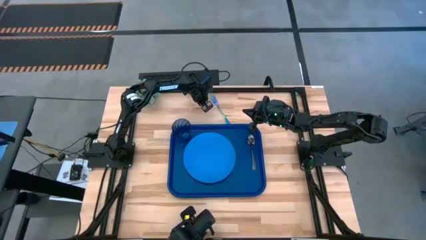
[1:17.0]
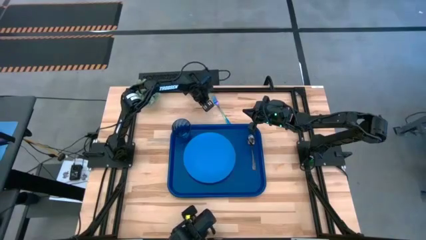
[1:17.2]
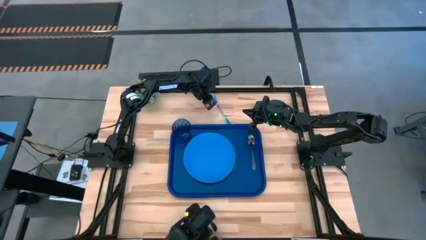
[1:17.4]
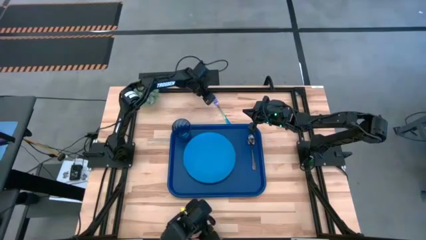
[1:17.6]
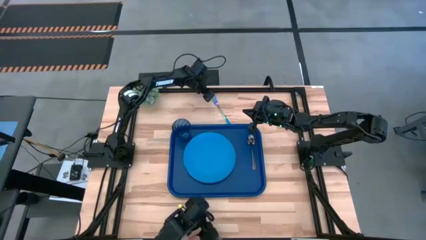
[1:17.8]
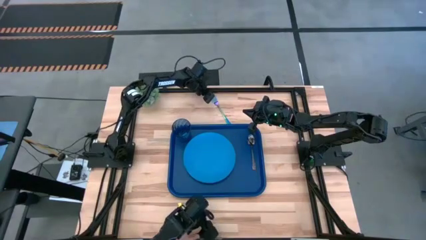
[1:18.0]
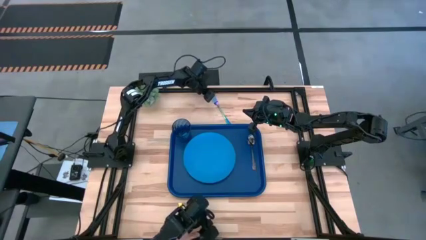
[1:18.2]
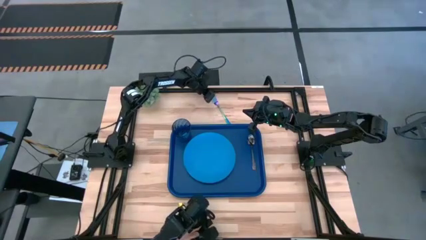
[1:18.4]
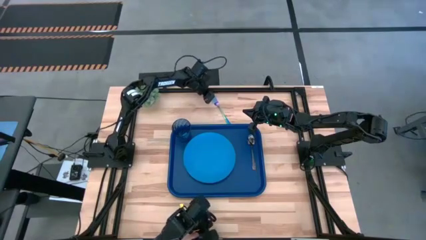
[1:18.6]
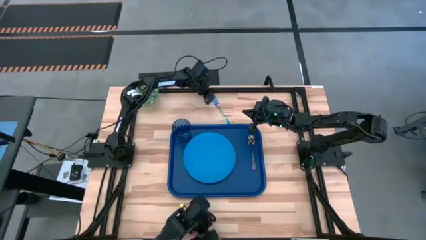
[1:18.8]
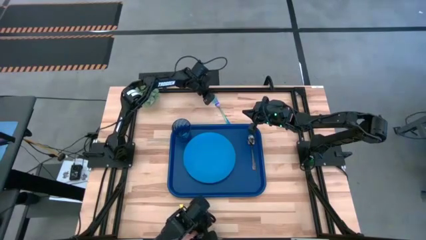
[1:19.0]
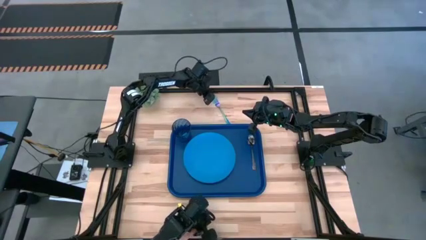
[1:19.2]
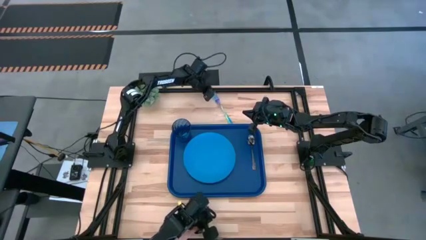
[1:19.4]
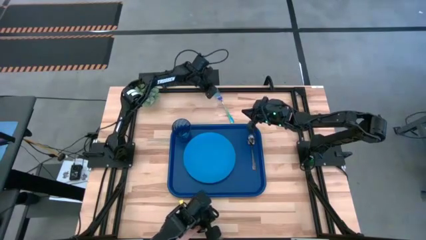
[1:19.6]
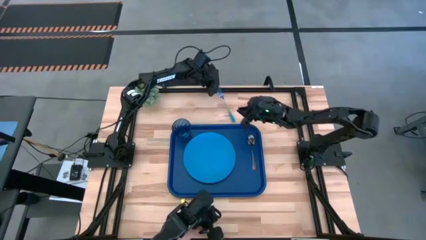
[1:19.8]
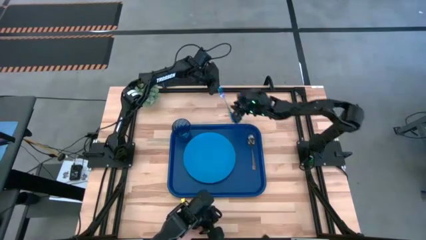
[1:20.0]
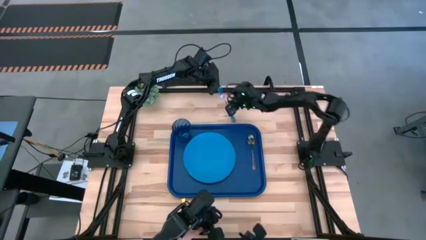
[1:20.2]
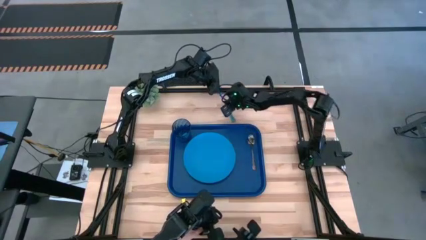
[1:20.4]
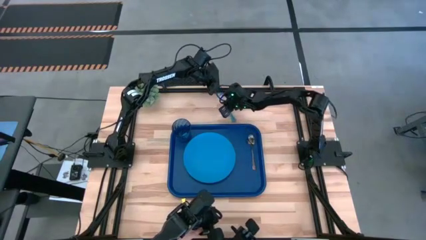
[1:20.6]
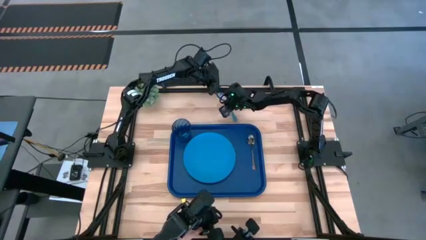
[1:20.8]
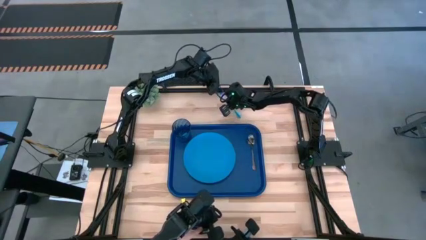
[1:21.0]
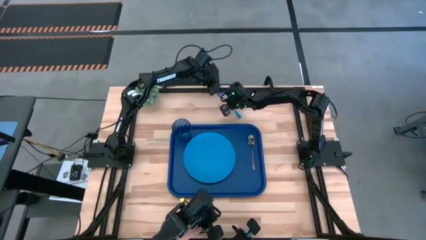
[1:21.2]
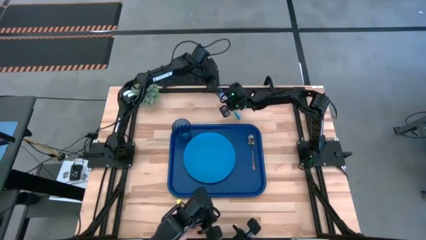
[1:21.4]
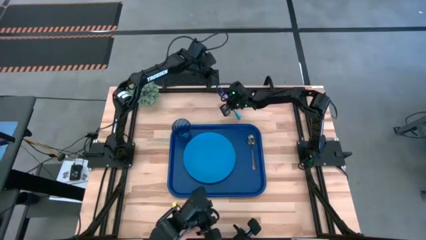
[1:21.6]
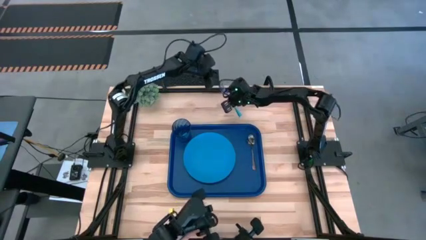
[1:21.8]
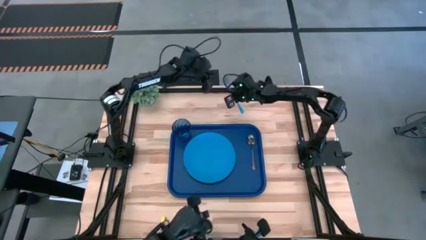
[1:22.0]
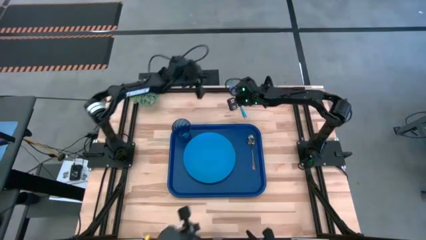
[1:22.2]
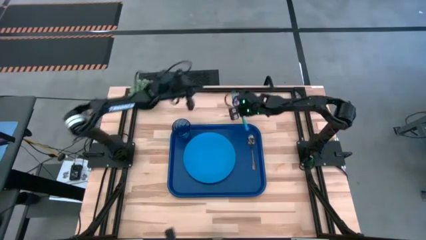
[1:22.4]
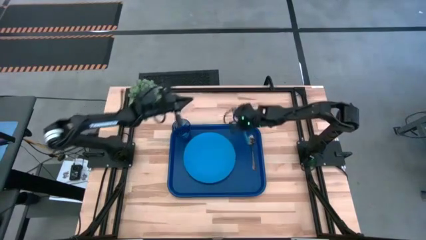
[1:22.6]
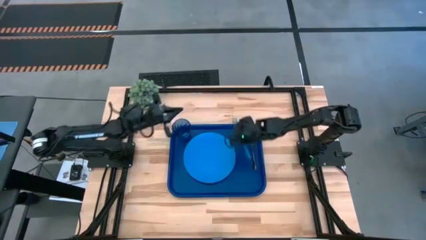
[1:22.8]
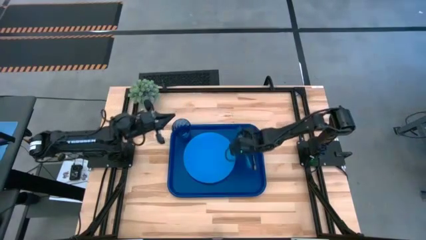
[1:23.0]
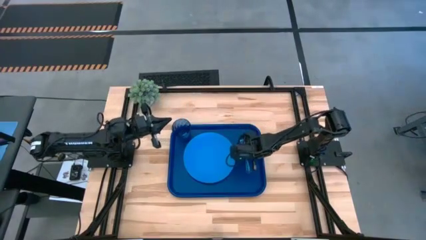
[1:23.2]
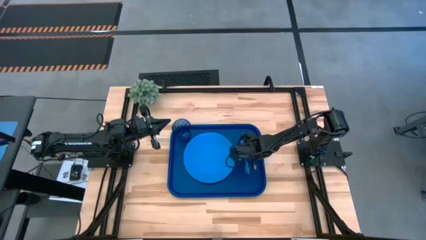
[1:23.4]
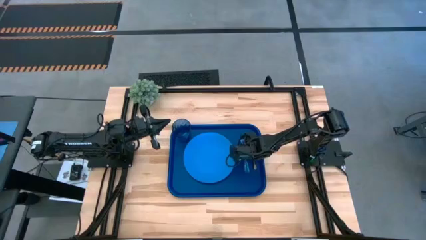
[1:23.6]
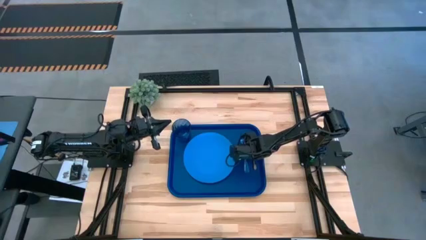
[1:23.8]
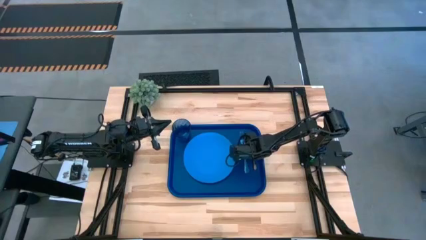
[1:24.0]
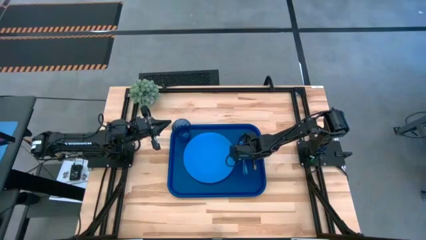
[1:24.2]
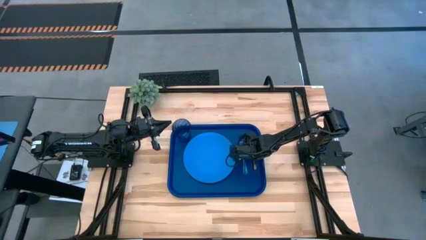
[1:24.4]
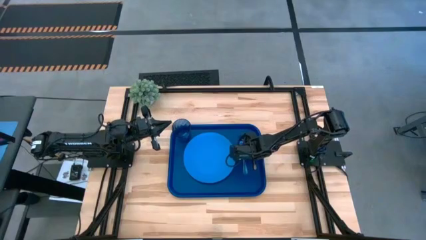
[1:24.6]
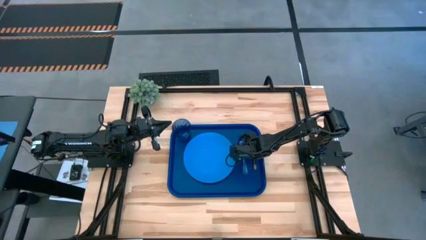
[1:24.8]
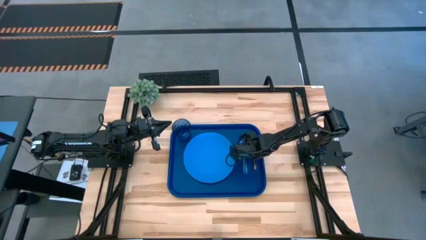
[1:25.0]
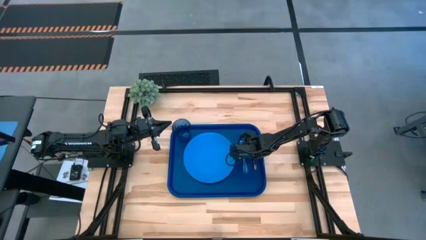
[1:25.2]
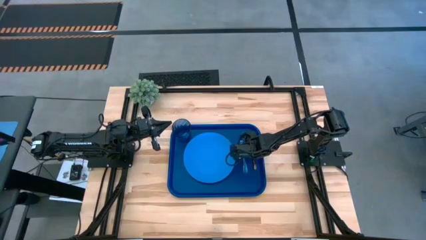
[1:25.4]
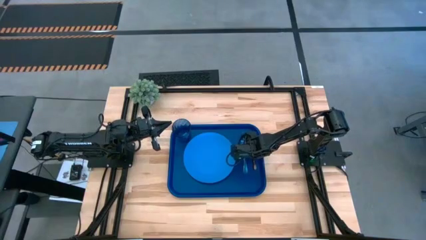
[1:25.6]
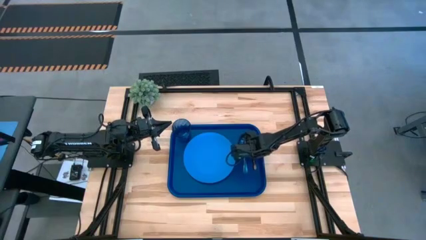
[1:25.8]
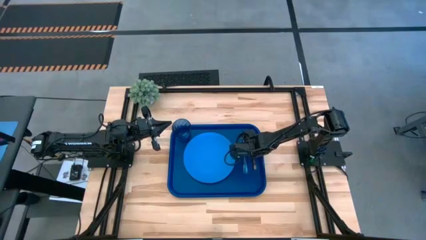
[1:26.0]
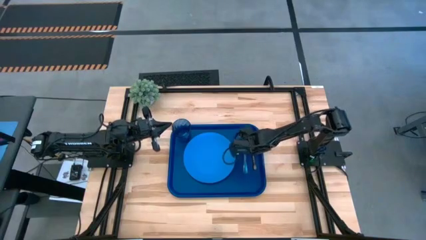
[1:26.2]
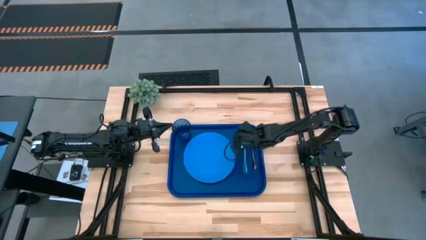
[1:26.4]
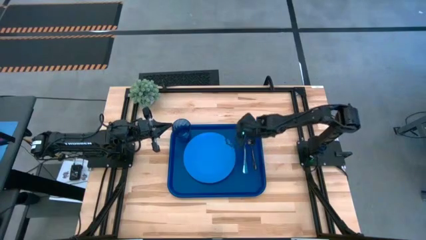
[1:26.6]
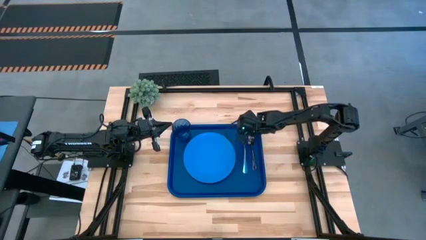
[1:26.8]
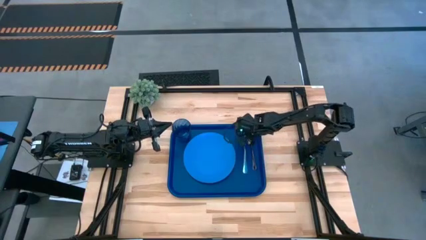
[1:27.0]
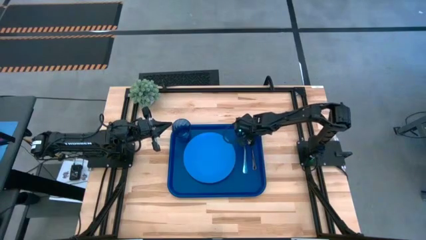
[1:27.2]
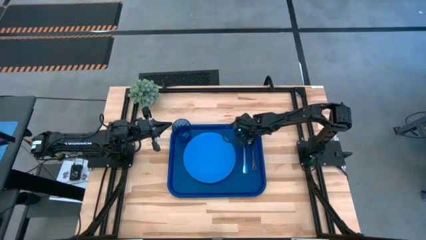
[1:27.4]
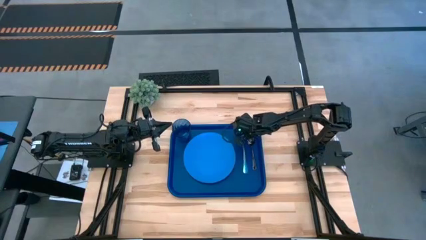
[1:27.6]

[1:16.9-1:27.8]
Task: Pick and place plate/cup/fork/spoon on tray
Put the blue fork on the blue tray to the right of the blue plate

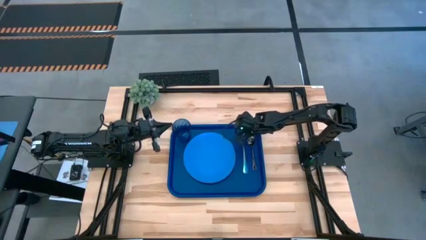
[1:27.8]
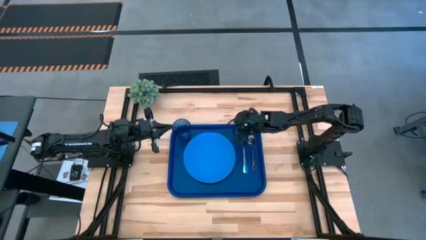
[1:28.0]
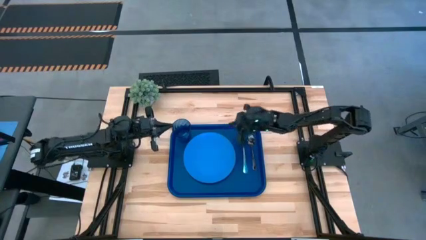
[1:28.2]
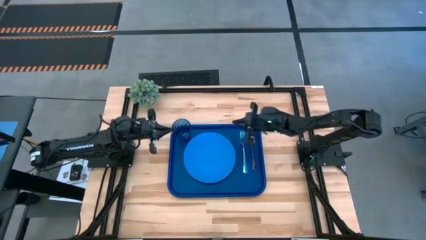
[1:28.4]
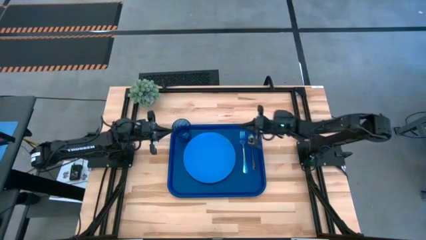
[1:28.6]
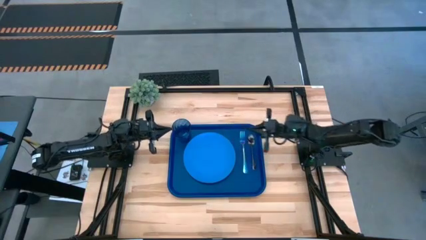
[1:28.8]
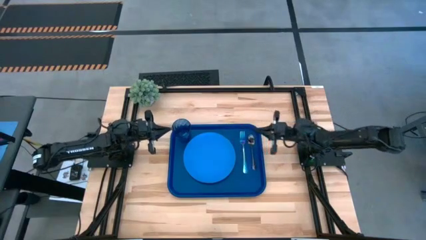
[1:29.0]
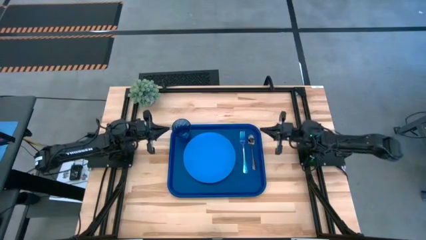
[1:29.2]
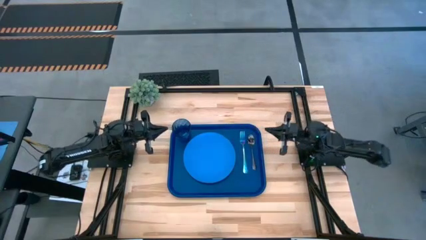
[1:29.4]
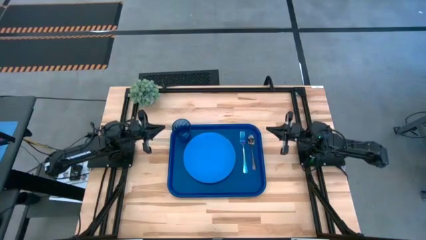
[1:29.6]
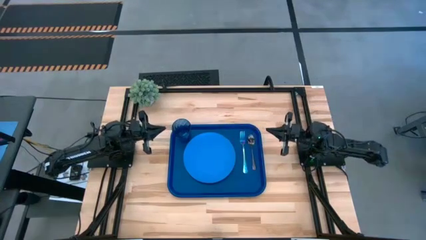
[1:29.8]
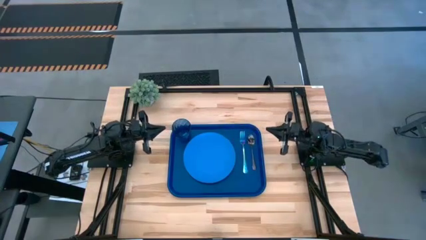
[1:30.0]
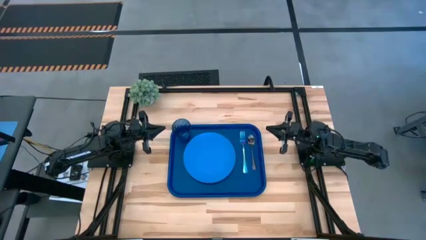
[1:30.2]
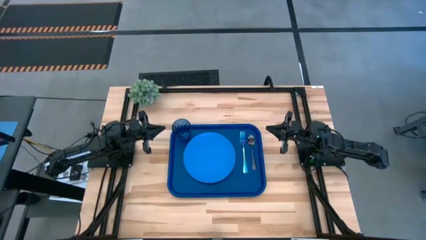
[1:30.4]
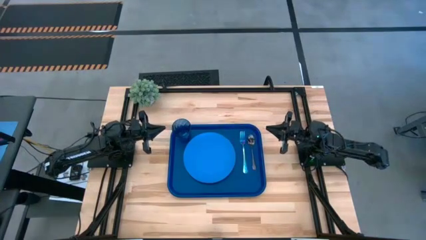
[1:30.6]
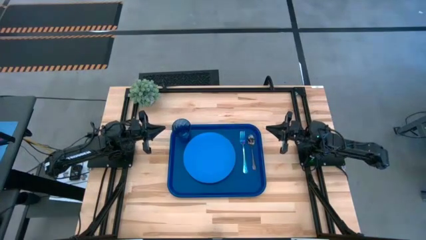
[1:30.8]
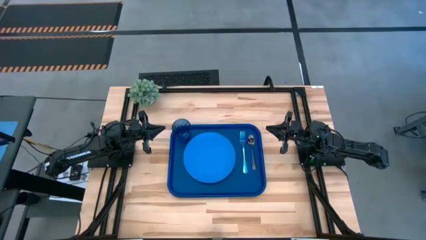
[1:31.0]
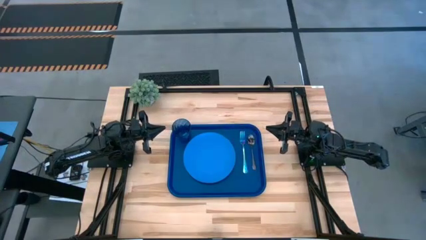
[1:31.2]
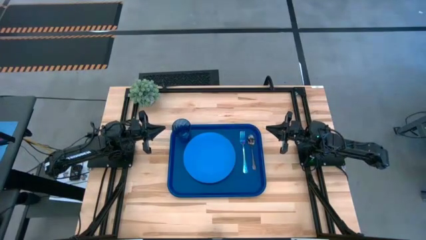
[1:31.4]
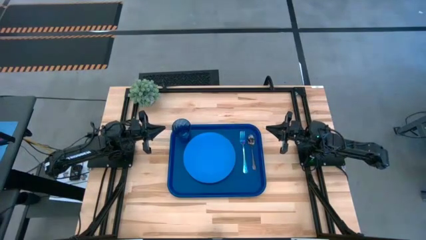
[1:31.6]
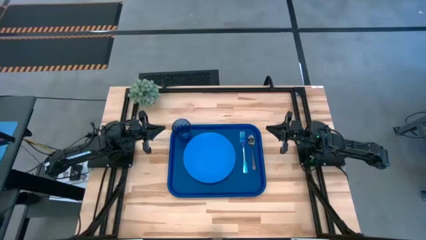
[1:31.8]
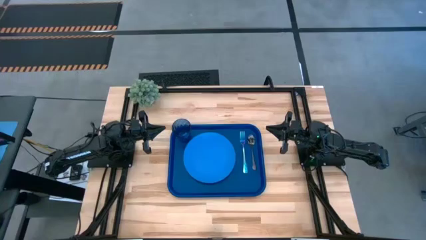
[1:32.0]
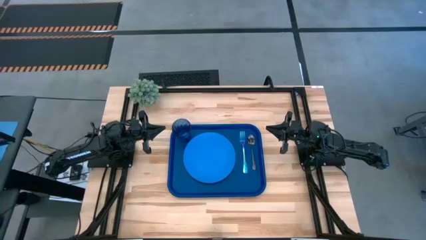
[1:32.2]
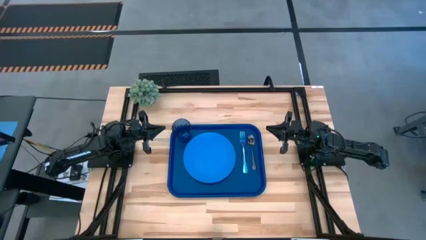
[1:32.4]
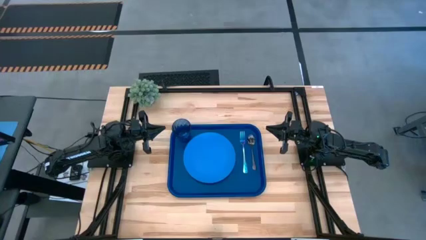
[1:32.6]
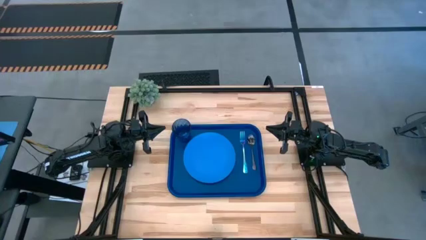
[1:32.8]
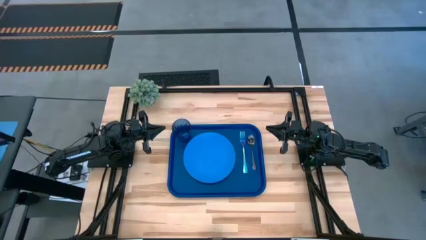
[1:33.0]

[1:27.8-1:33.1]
Return to Home Position
